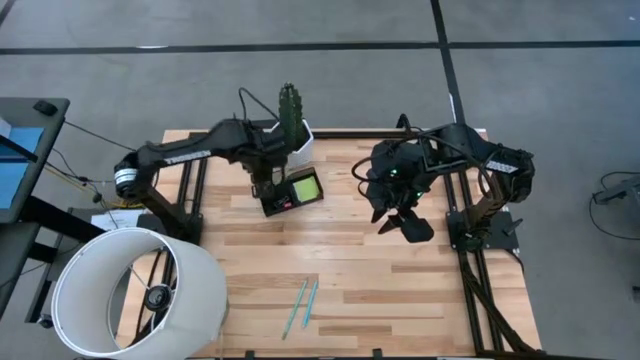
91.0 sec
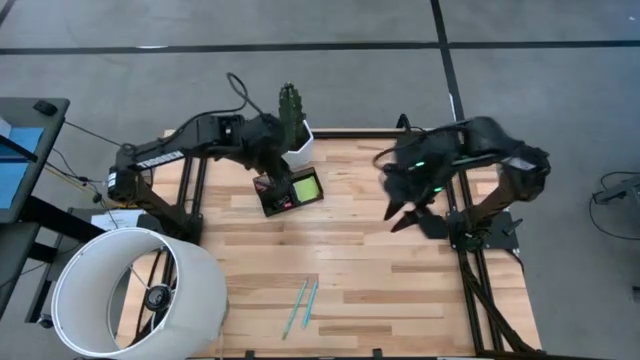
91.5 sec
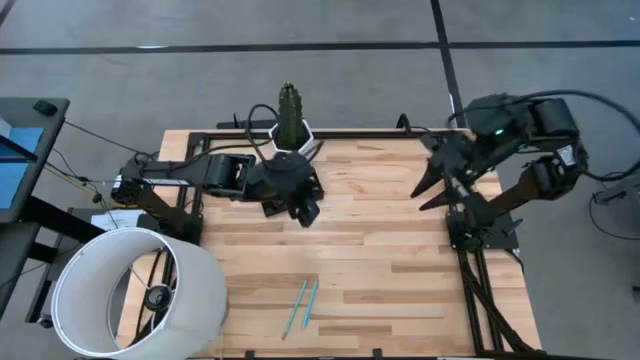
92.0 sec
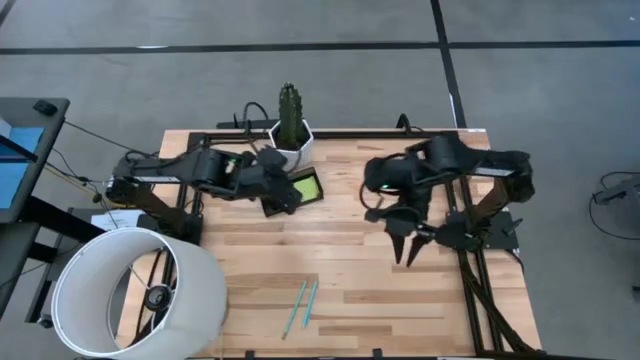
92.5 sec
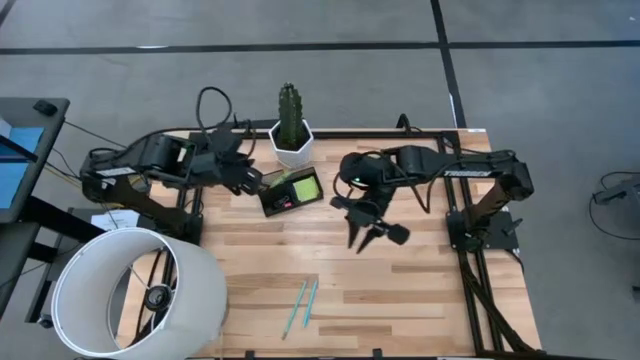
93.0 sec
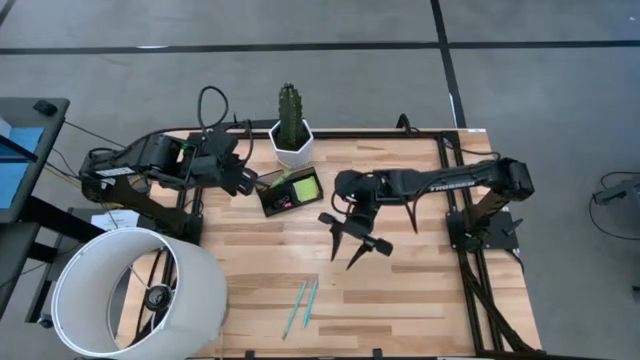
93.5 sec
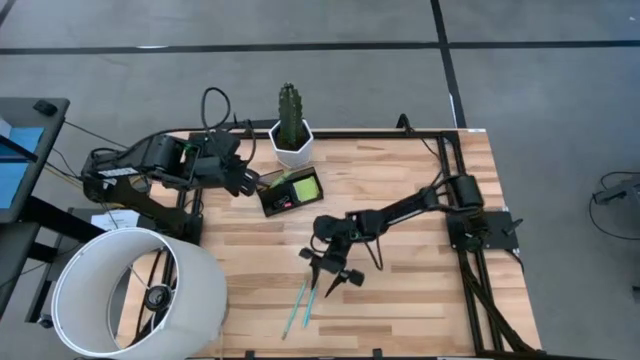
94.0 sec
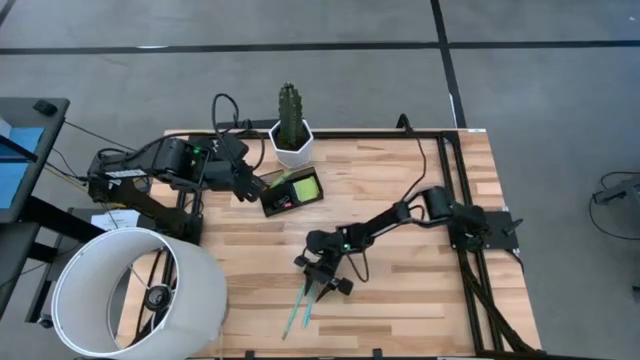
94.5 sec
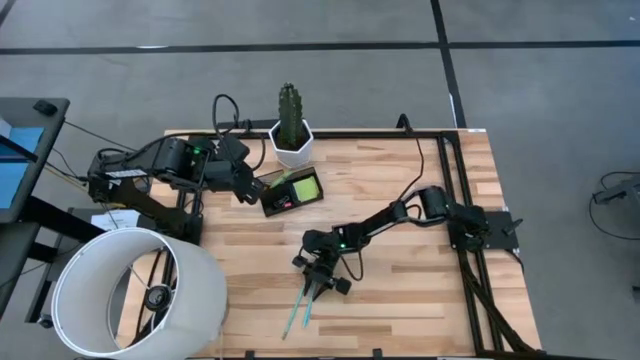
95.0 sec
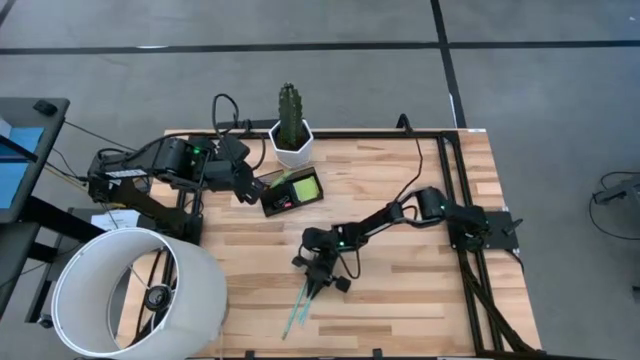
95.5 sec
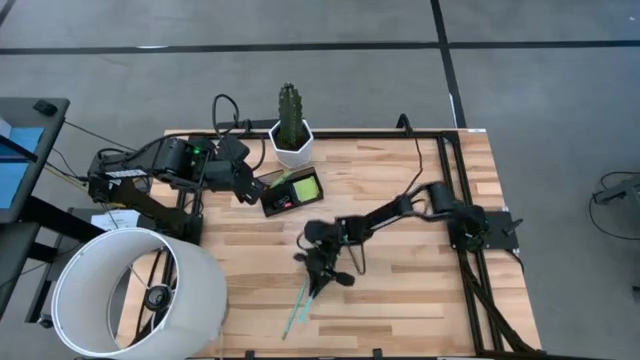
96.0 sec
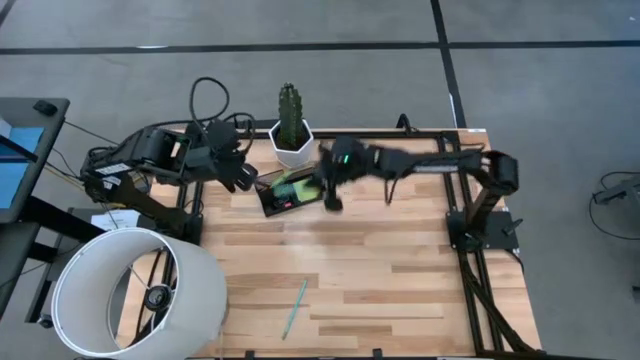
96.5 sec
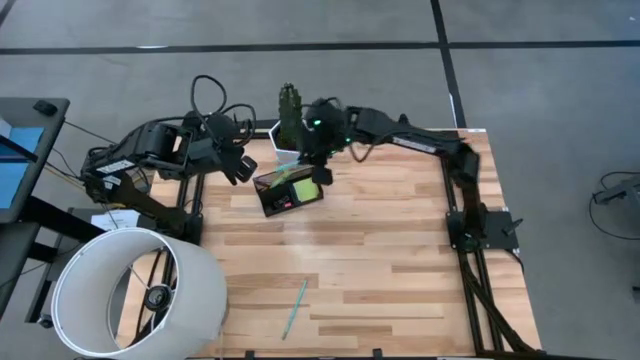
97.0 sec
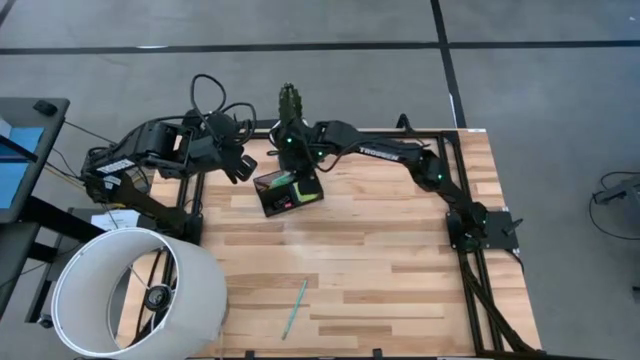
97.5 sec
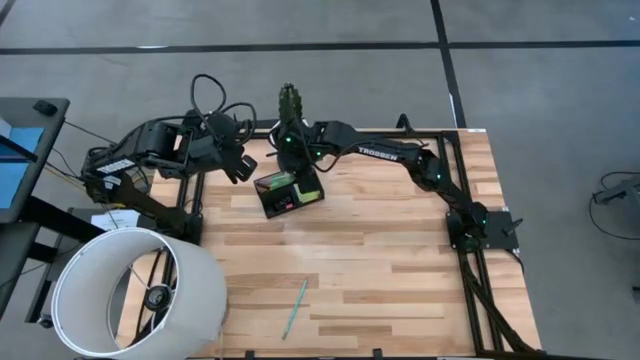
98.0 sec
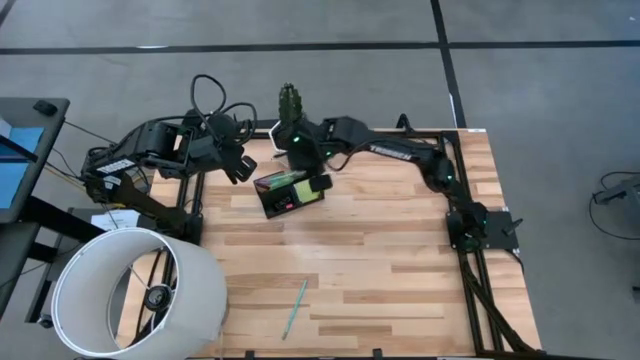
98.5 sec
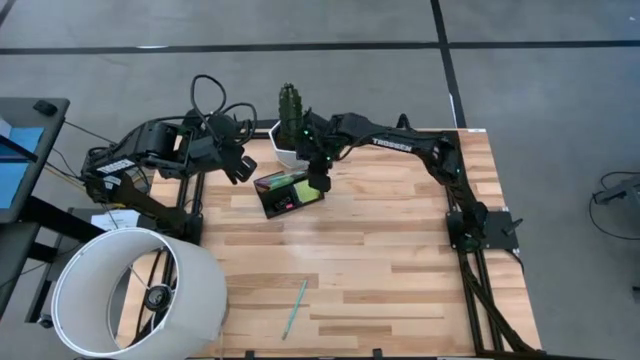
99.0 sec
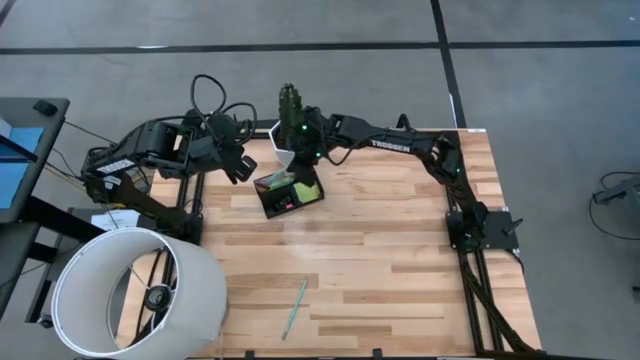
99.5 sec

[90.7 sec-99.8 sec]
Task: Pick and place office supplies into organizer
Put the blue pen into the black mesh organizer

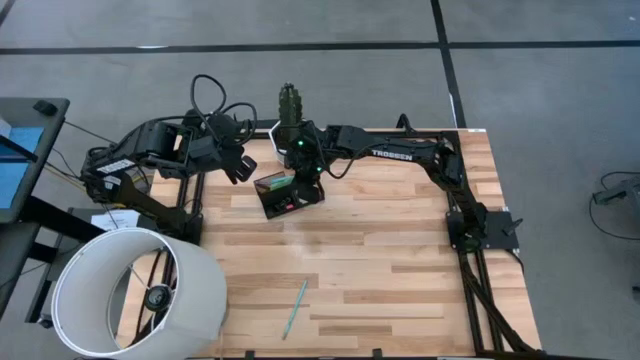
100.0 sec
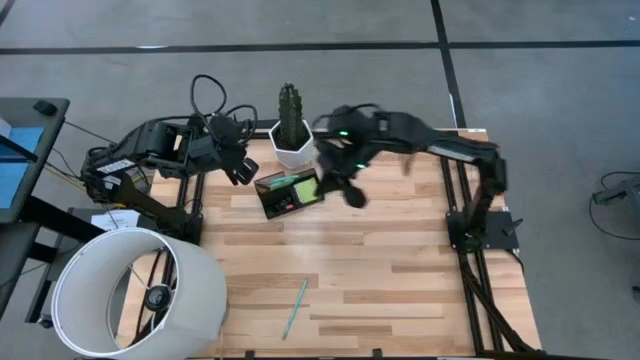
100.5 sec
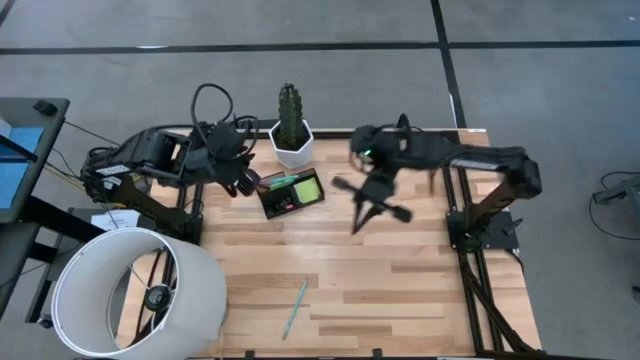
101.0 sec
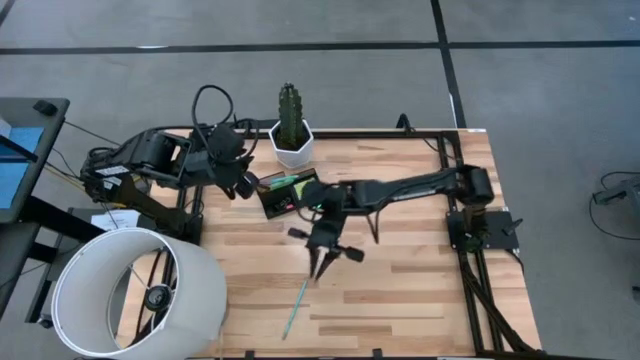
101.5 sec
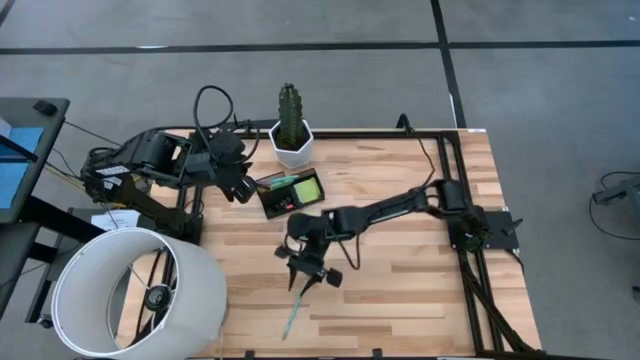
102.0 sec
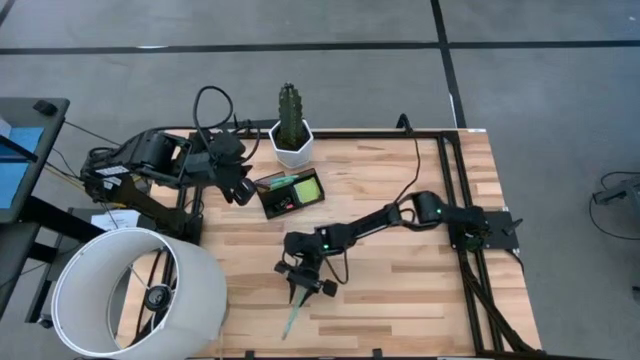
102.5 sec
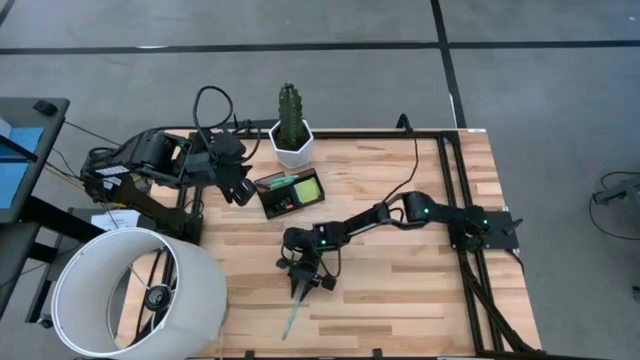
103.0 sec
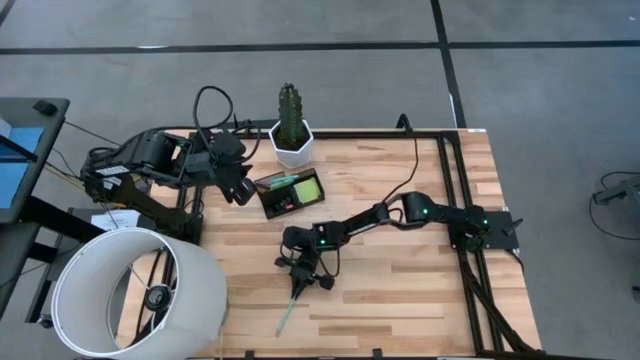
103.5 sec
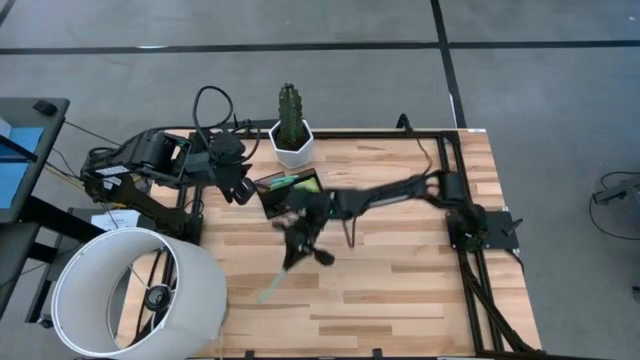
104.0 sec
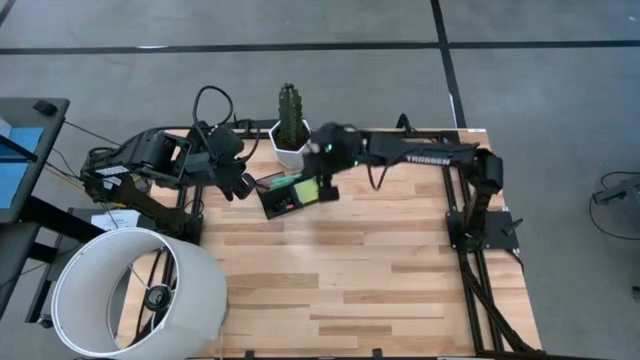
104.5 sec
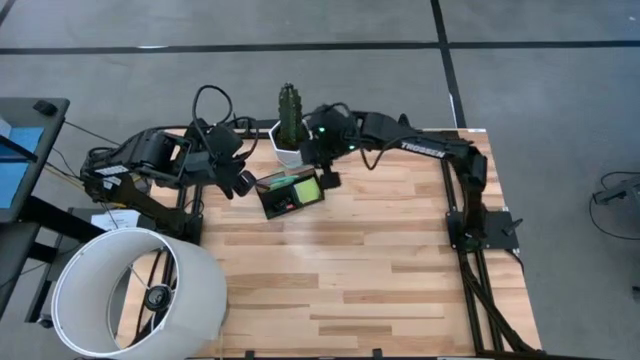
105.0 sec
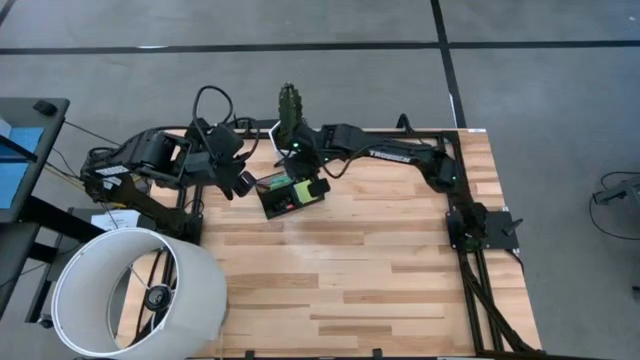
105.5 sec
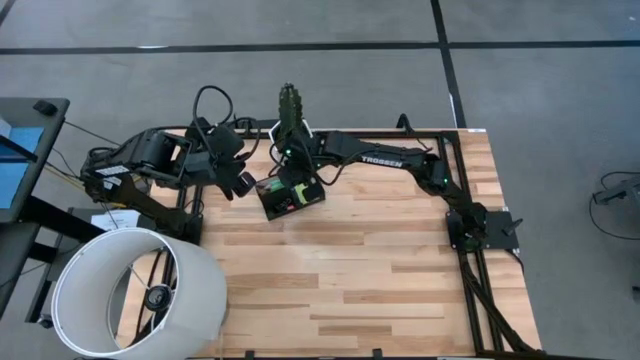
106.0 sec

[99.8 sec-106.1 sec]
Put the blue pencil into the black mesh organizer

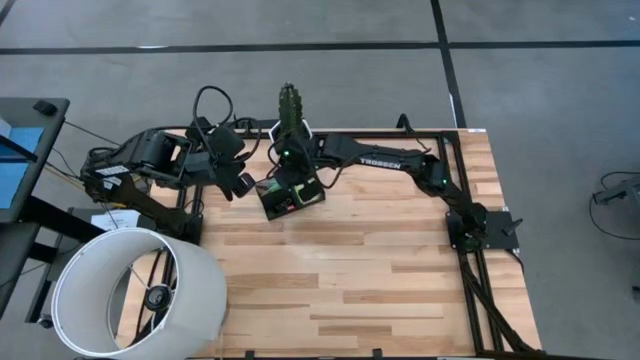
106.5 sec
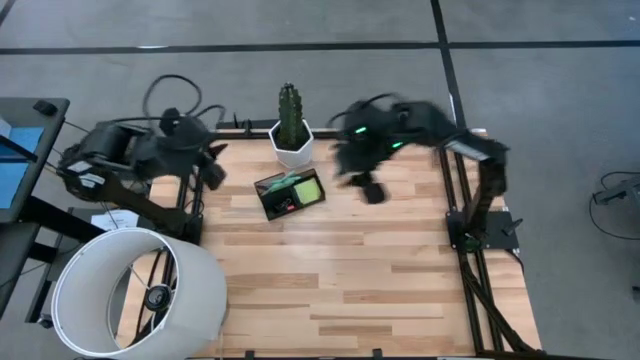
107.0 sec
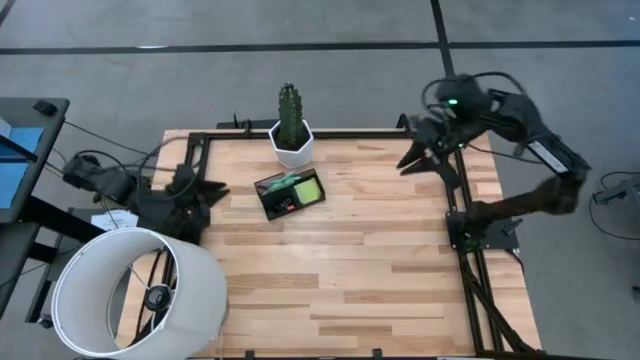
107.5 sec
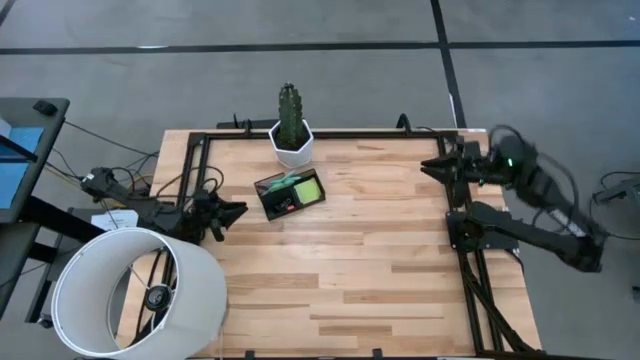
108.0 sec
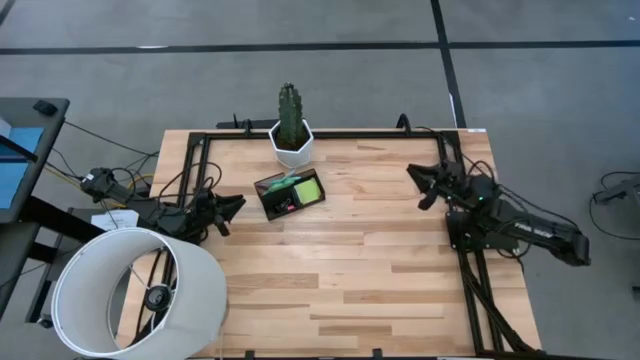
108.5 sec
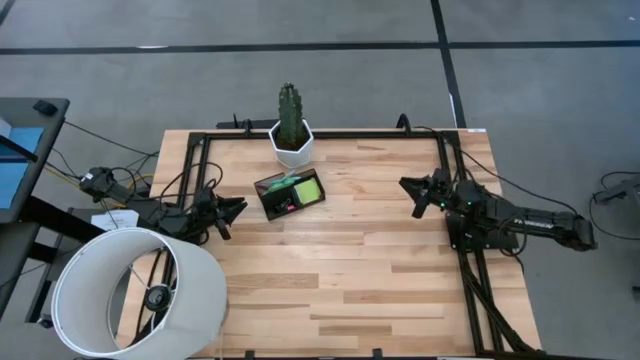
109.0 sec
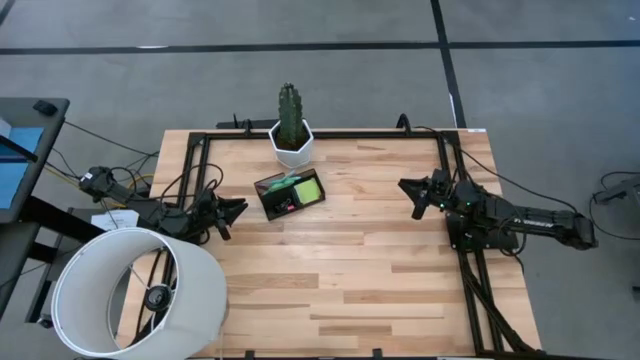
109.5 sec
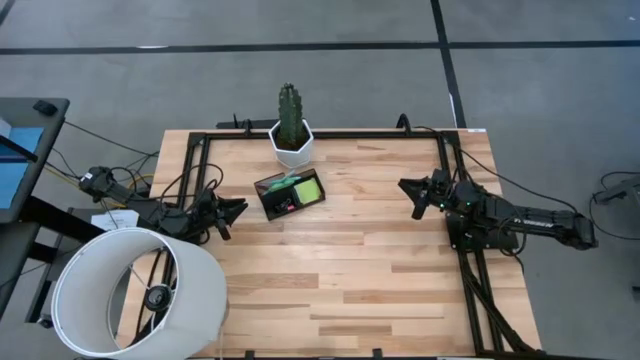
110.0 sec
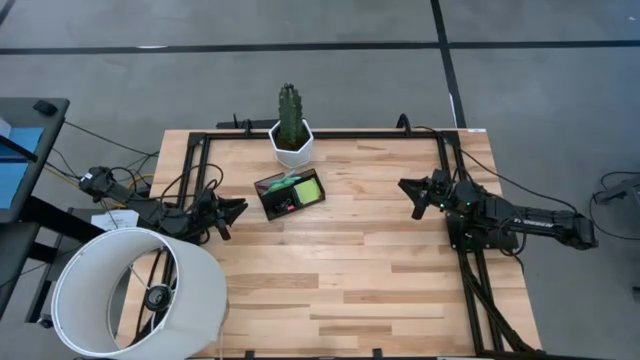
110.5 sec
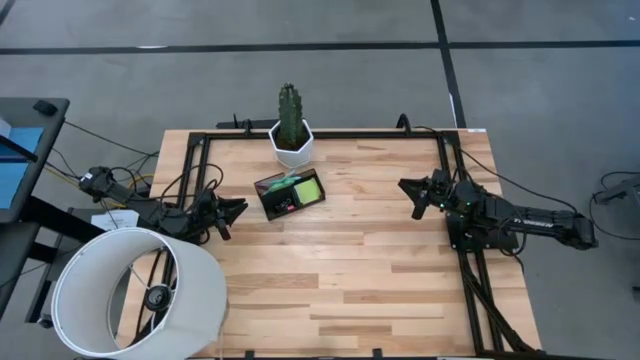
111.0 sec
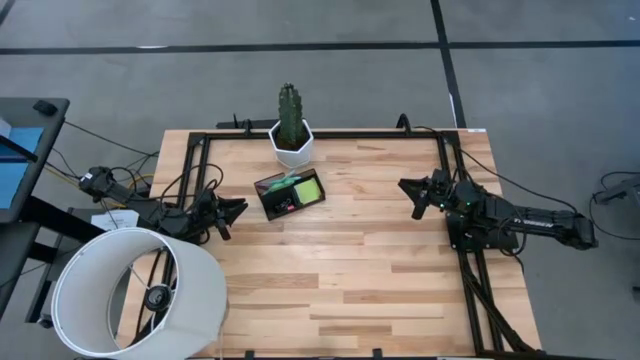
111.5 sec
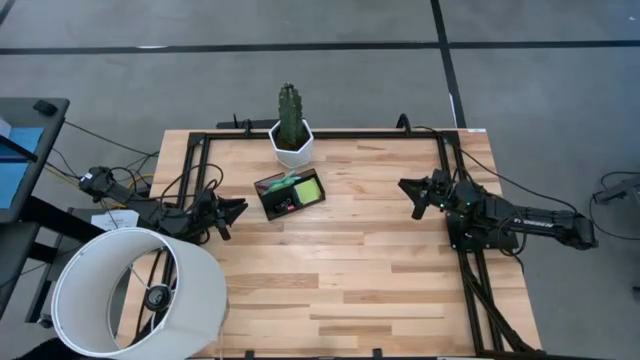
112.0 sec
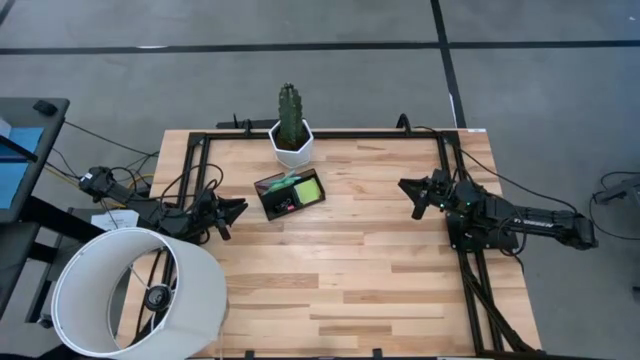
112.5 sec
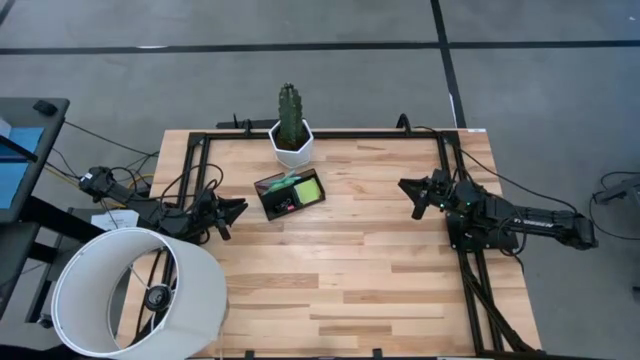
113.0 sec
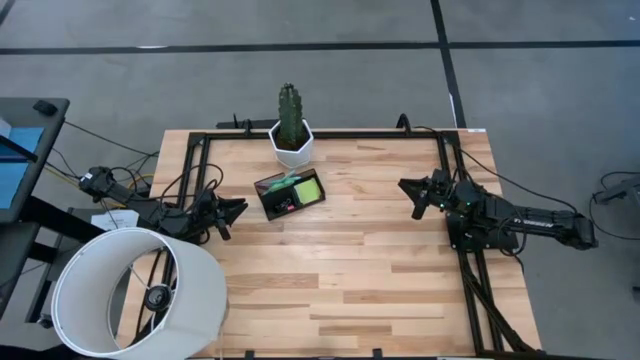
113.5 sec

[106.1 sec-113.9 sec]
Return to Home Position
